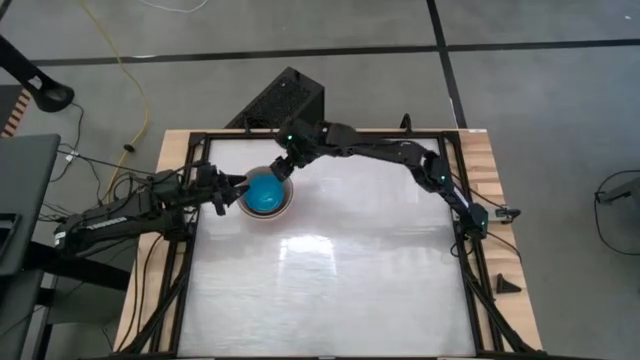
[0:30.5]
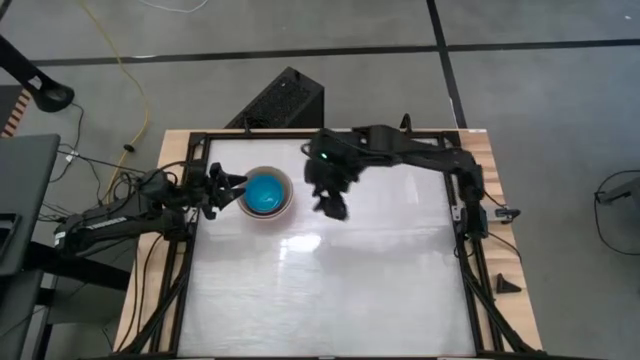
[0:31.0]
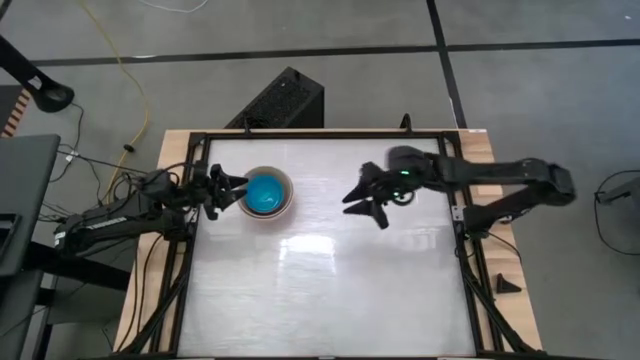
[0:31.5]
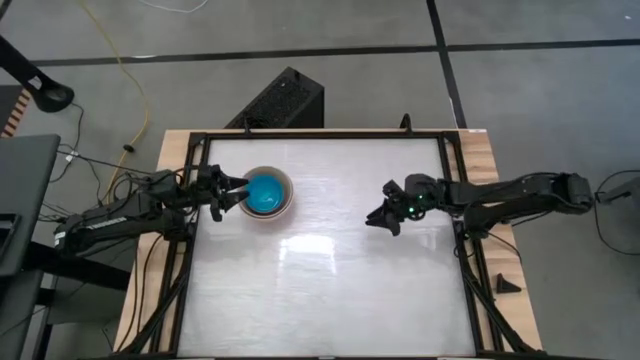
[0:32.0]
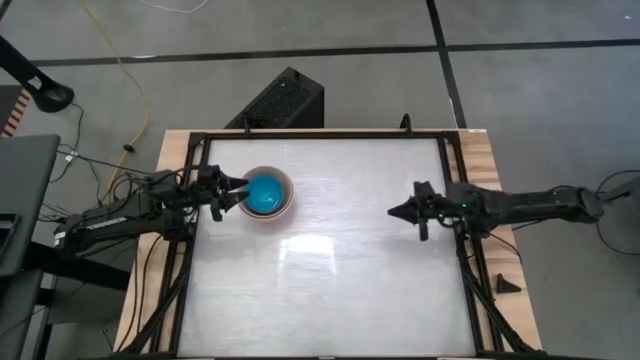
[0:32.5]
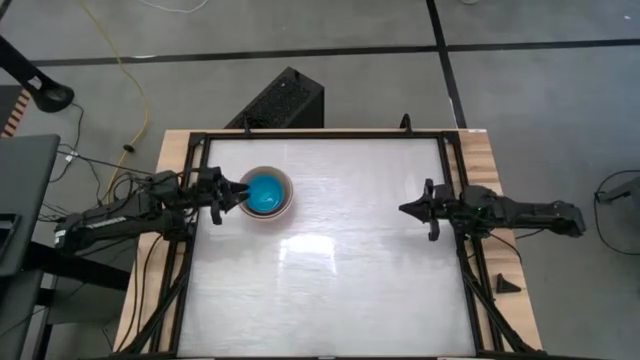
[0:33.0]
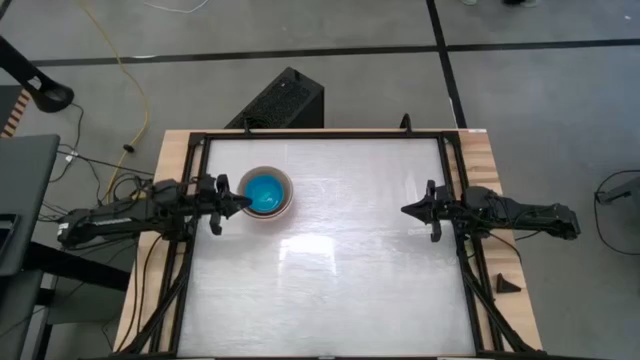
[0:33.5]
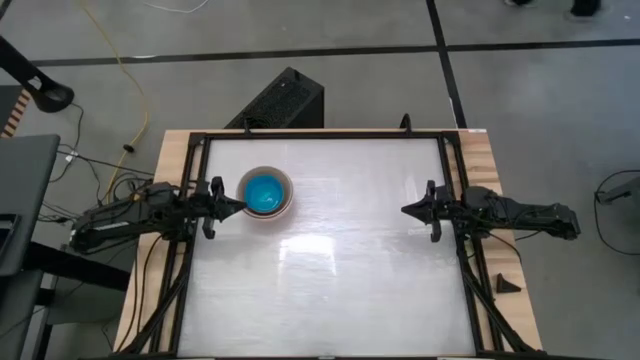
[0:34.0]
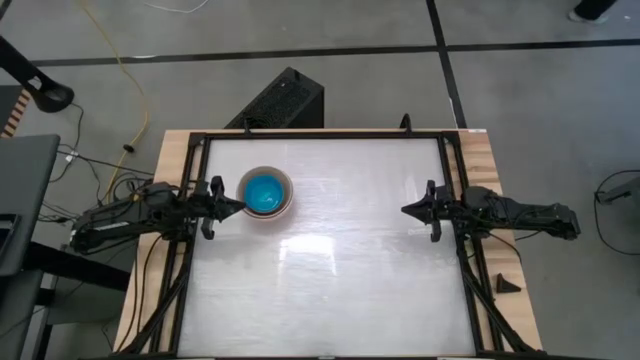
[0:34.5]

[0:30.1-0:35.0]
Return to Home Position

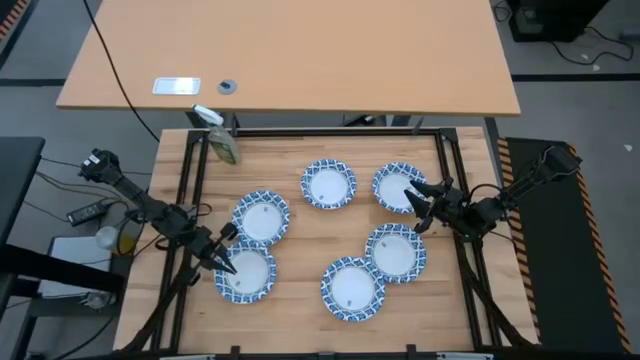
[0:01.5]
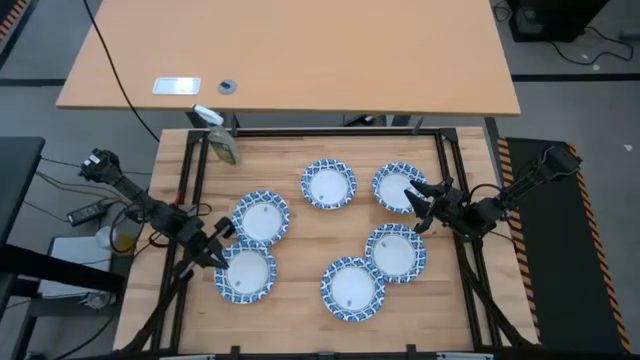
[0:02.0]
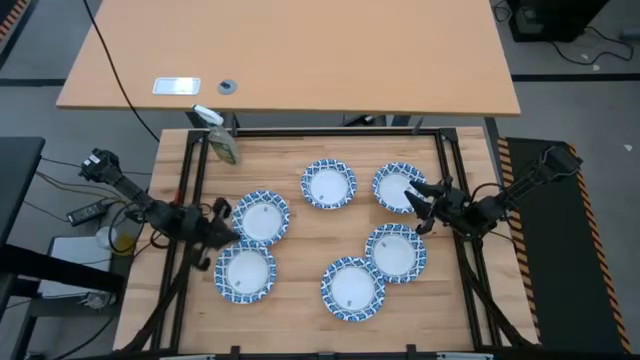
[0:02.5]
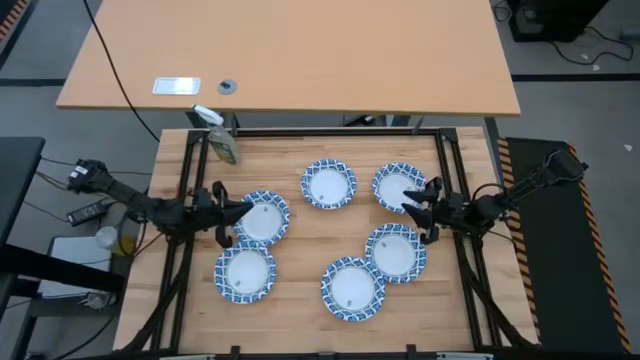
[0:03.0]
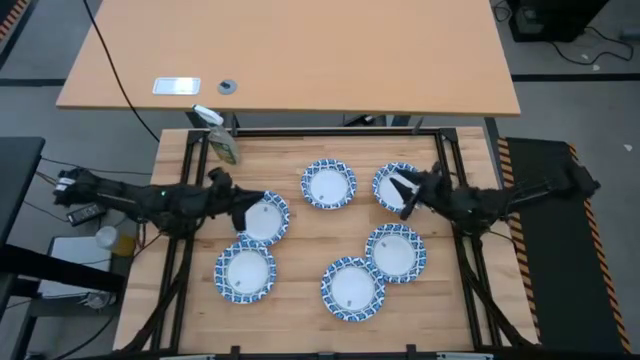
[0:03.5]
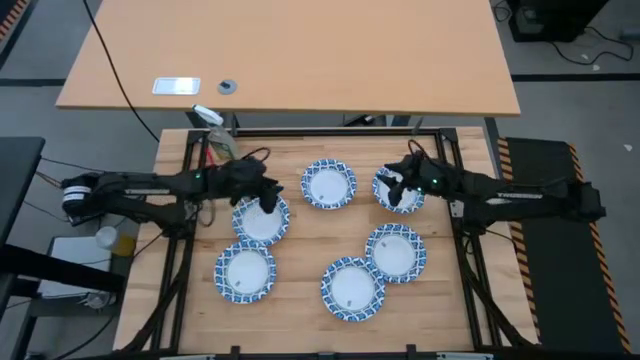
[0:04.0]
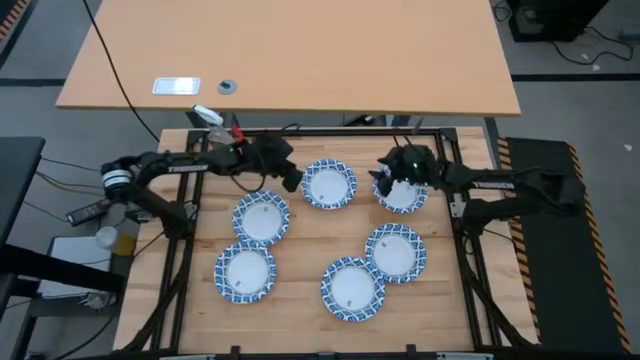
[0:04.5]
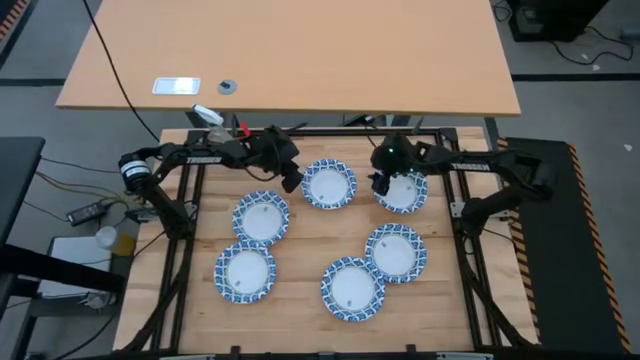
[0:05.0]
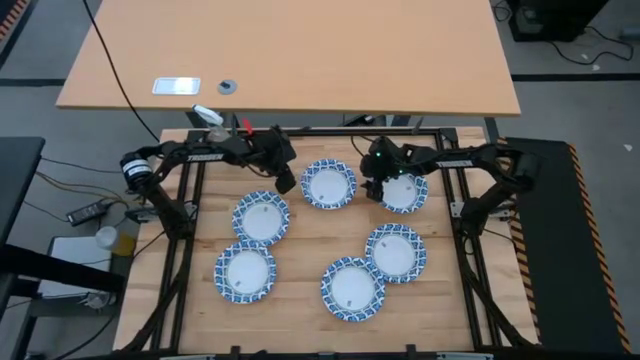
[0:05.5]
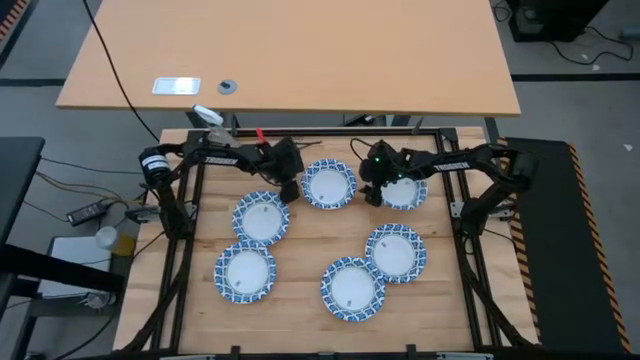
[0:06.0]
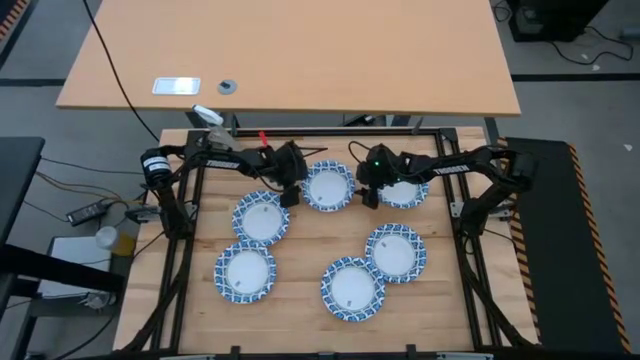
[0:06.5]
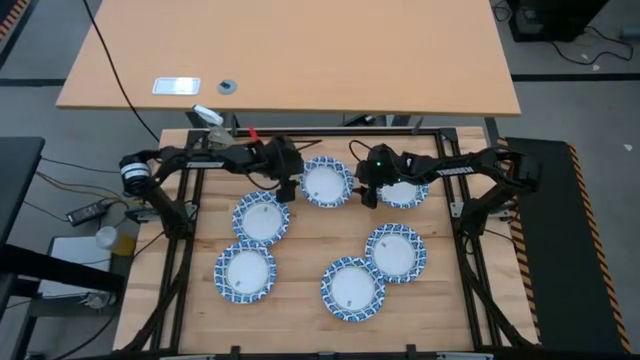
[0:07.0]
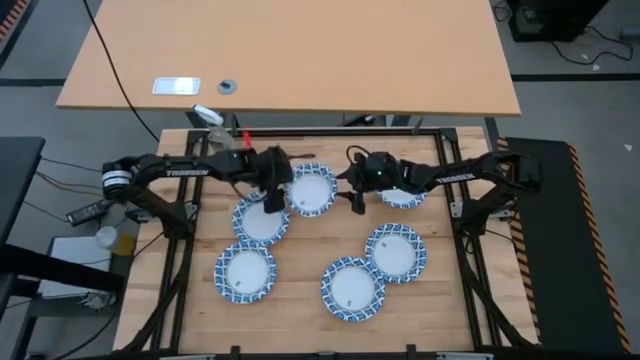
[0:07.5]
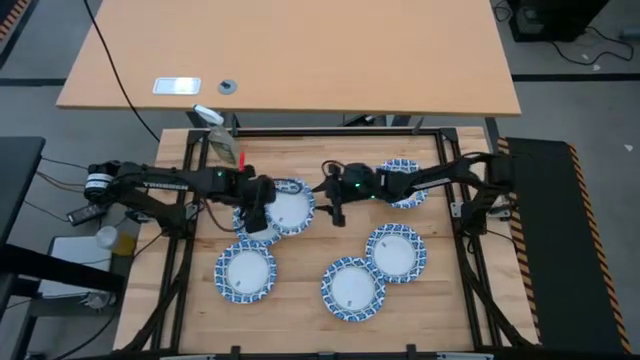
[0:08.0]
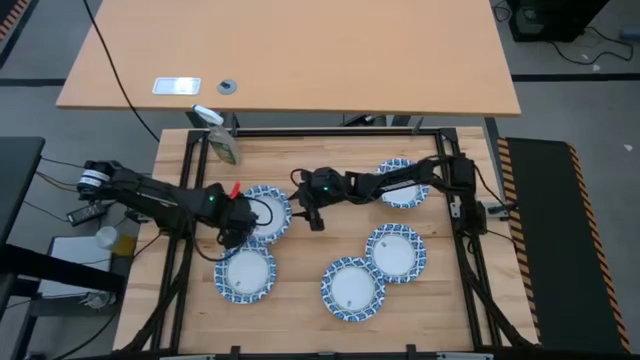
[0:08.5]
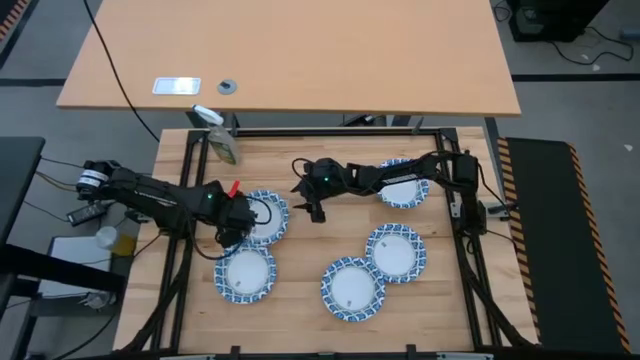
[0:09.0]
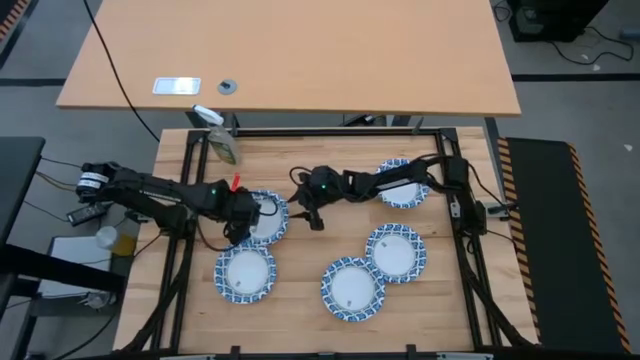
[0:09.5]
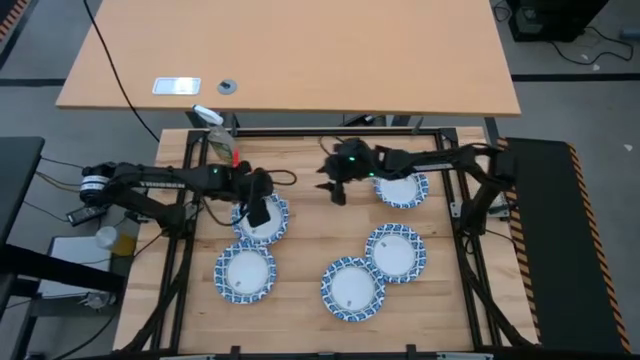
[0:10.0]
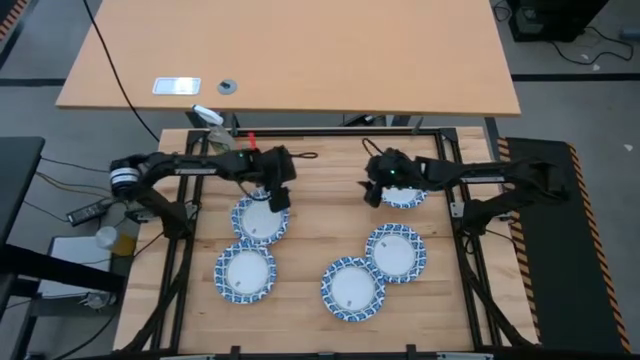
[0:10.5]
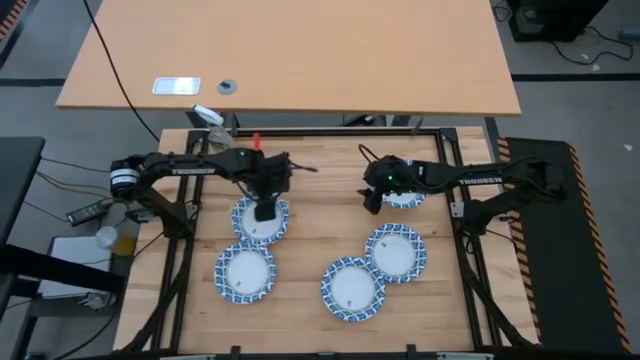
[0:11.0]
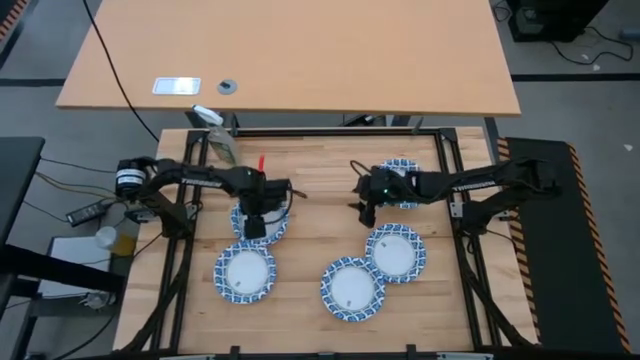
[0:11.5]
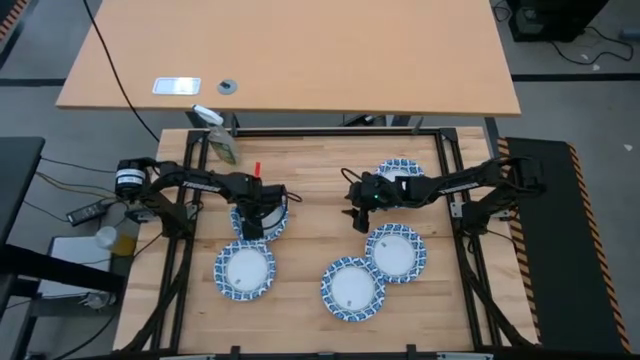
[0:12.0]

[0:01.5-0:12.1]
Stack the white bowl on top of the other white bowl

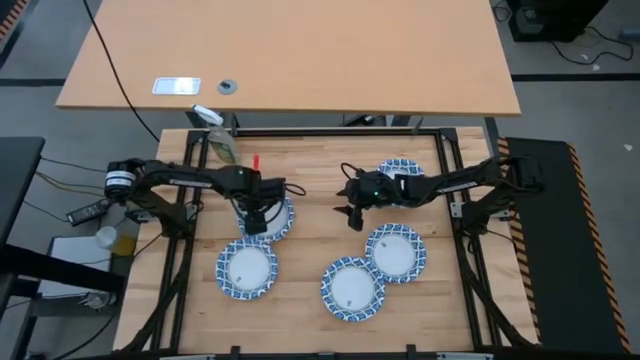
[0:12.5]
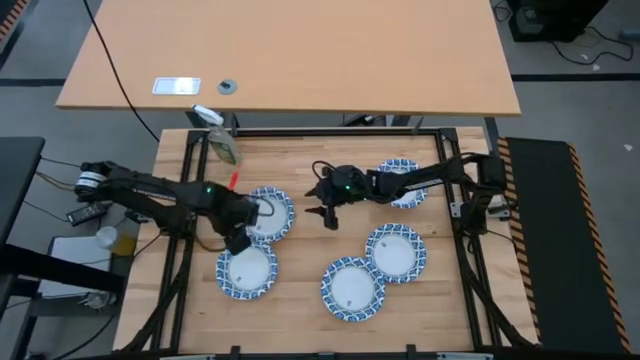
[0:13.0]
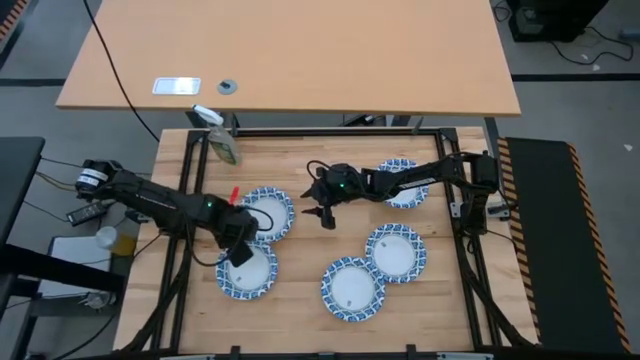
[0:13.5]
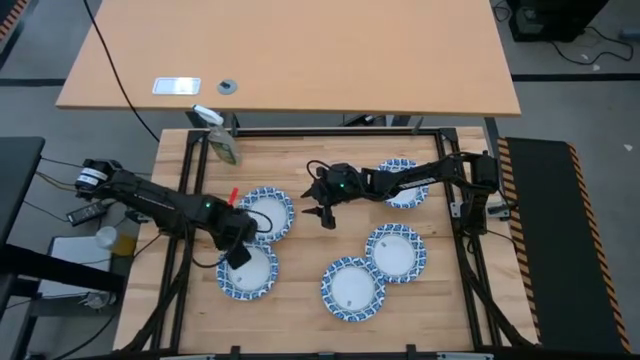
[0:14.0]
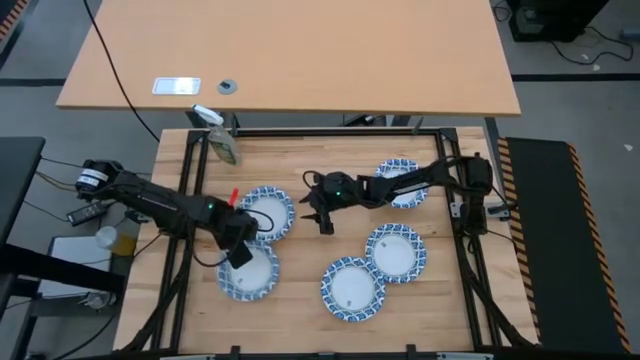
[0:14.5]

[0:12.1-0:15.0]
Adjust the white bowl
